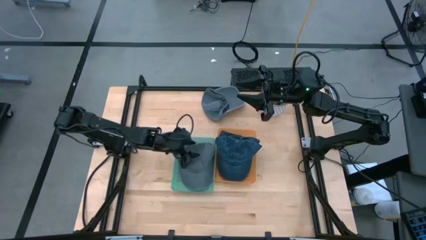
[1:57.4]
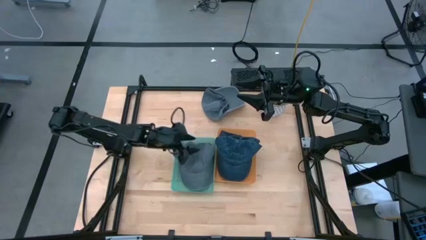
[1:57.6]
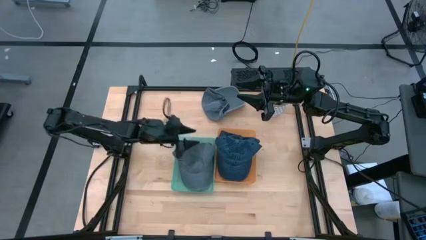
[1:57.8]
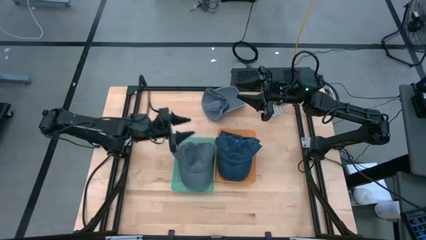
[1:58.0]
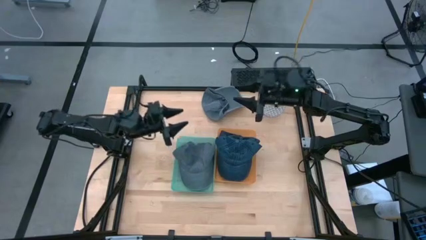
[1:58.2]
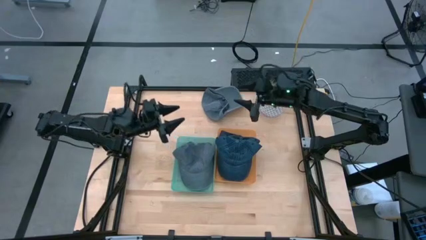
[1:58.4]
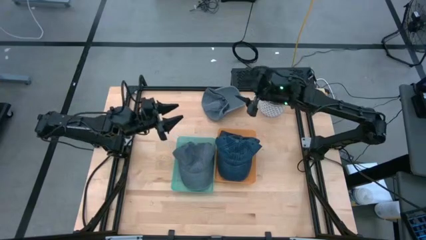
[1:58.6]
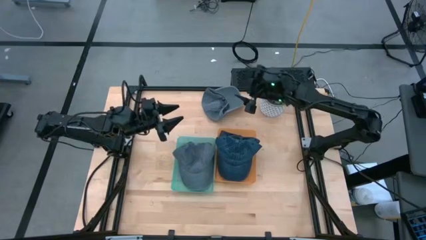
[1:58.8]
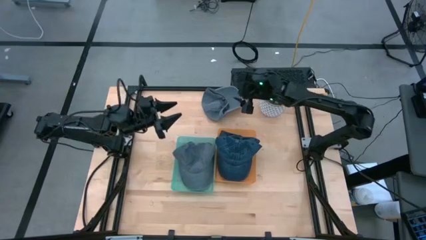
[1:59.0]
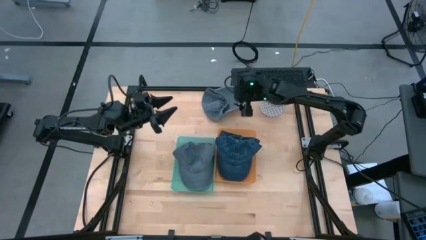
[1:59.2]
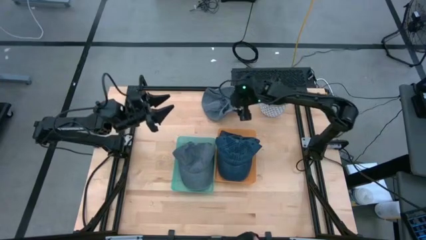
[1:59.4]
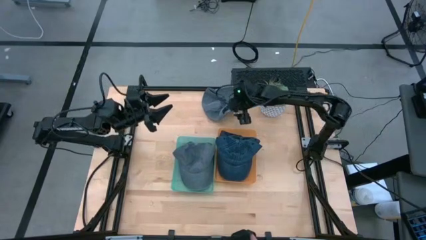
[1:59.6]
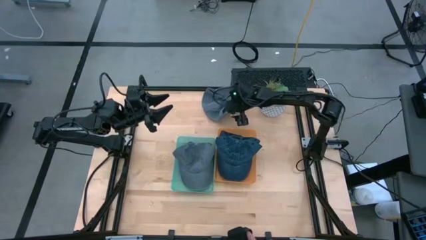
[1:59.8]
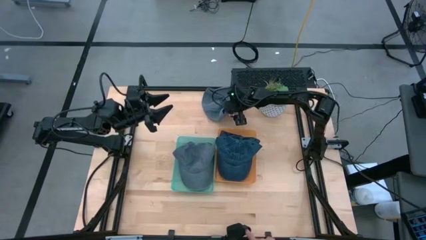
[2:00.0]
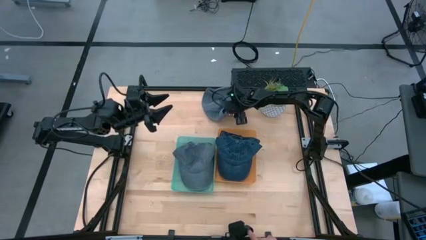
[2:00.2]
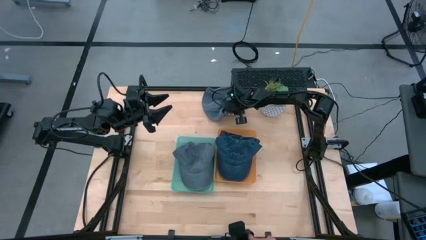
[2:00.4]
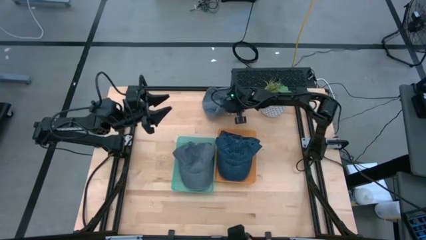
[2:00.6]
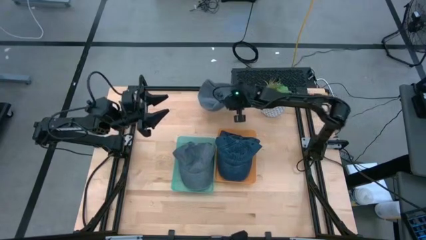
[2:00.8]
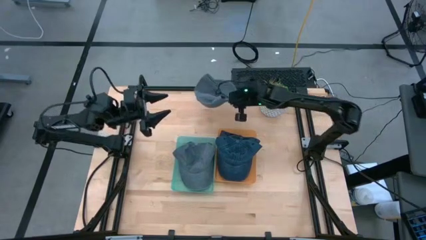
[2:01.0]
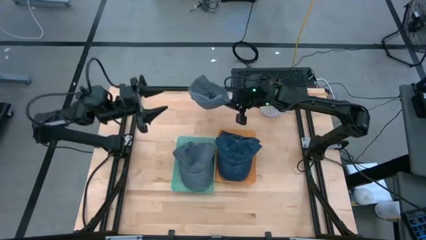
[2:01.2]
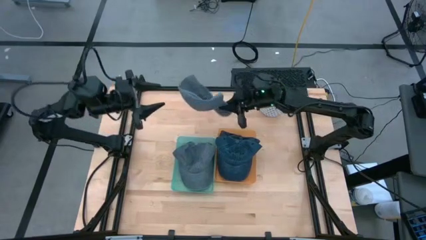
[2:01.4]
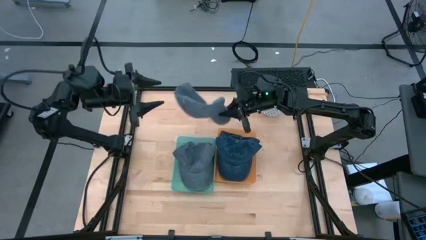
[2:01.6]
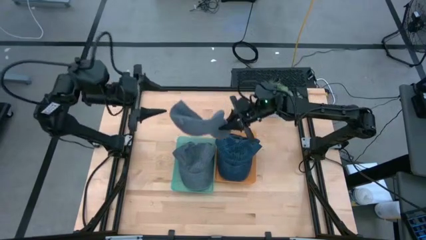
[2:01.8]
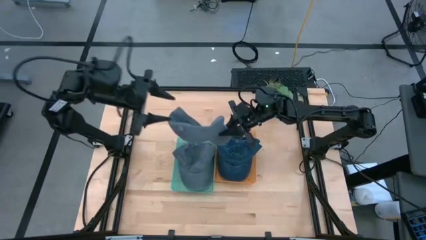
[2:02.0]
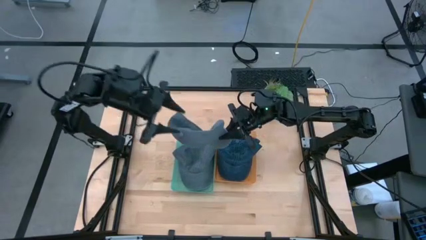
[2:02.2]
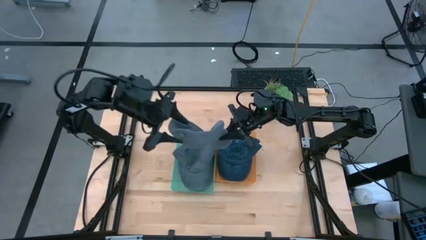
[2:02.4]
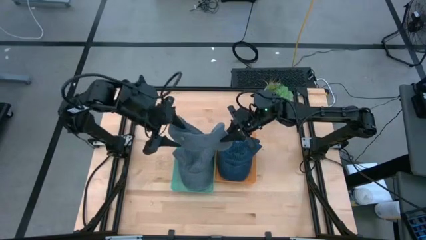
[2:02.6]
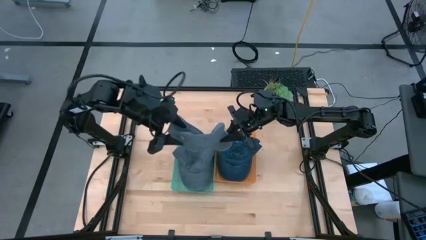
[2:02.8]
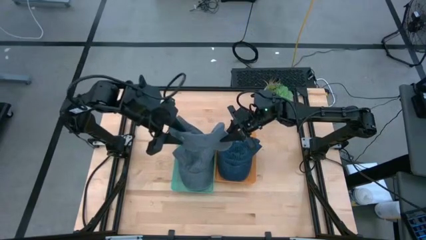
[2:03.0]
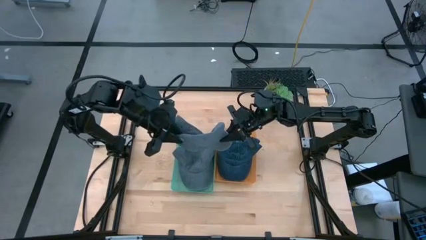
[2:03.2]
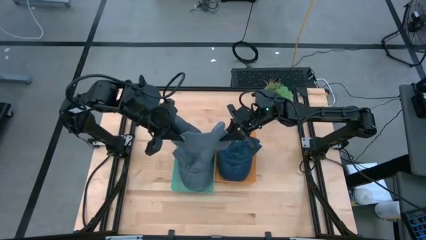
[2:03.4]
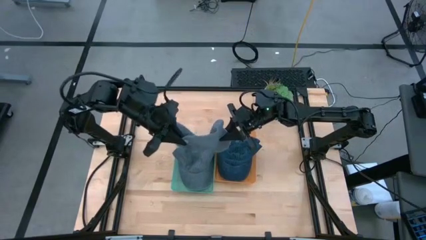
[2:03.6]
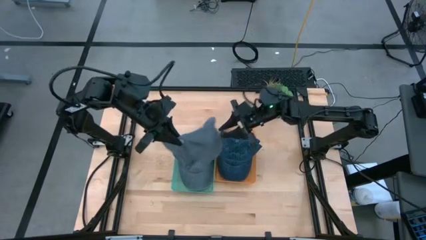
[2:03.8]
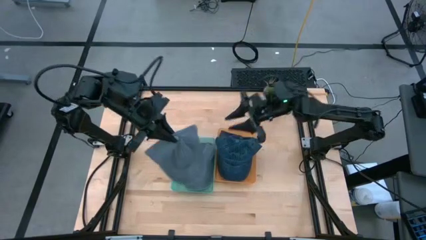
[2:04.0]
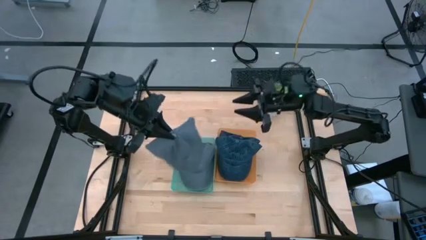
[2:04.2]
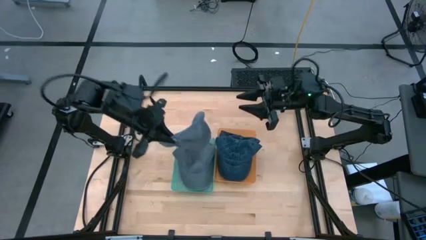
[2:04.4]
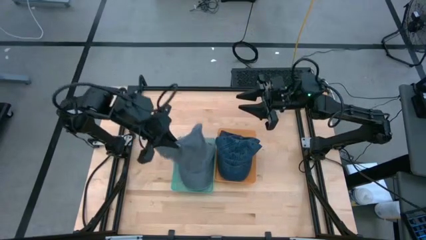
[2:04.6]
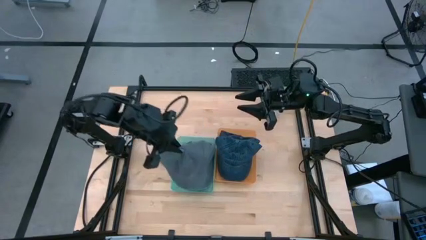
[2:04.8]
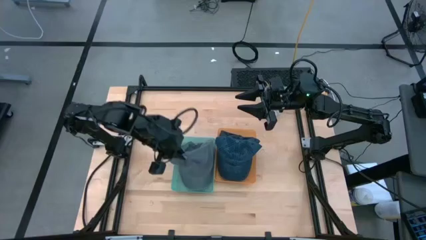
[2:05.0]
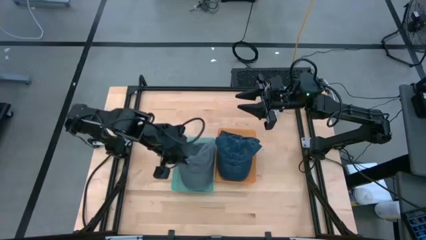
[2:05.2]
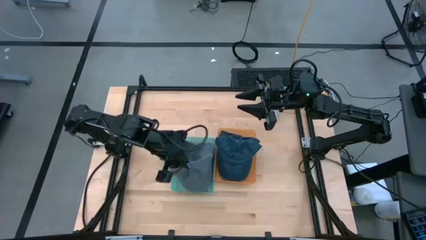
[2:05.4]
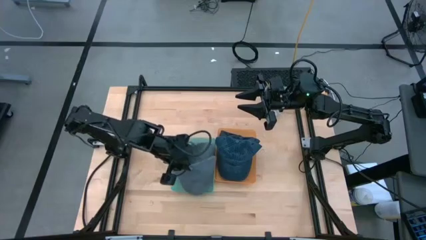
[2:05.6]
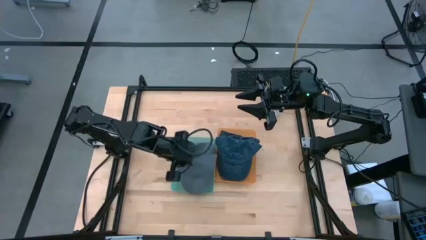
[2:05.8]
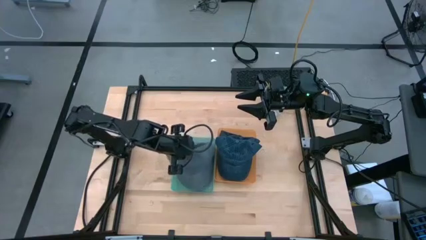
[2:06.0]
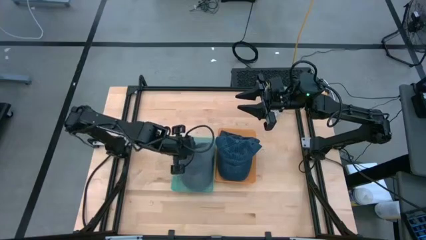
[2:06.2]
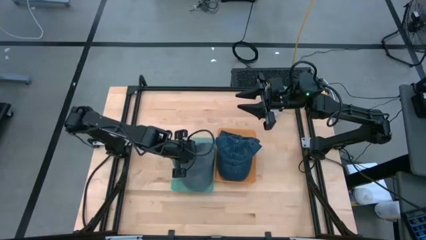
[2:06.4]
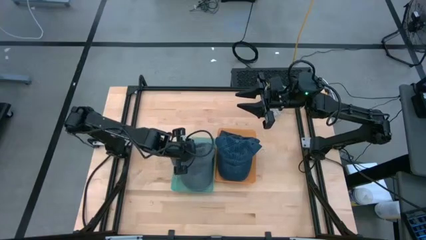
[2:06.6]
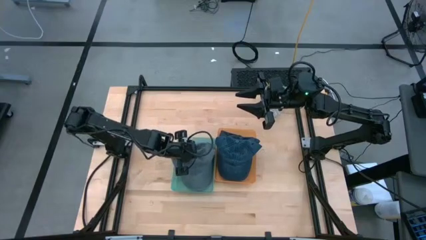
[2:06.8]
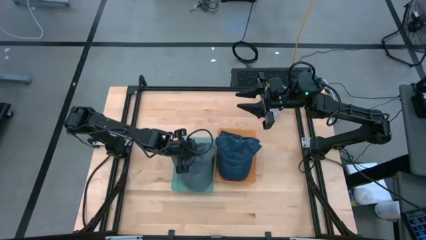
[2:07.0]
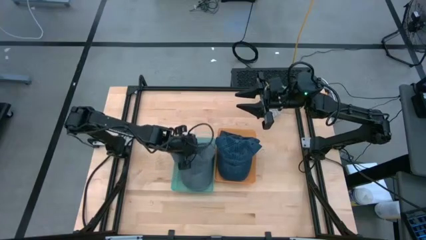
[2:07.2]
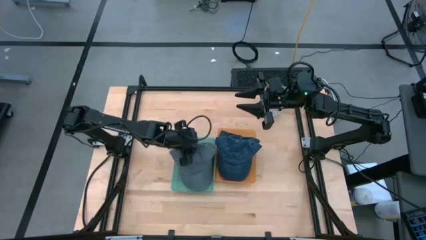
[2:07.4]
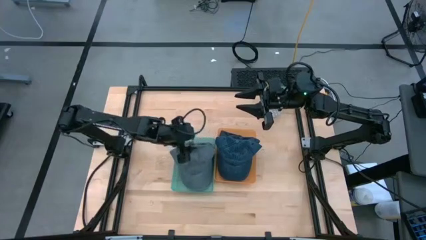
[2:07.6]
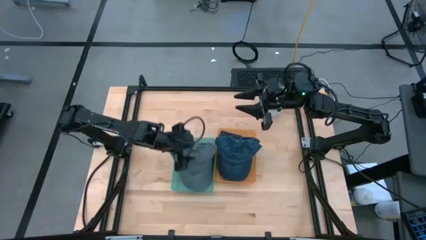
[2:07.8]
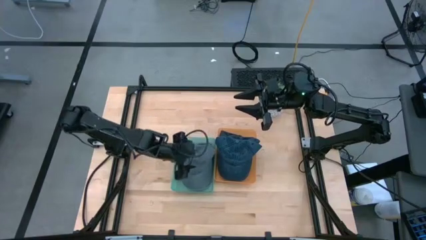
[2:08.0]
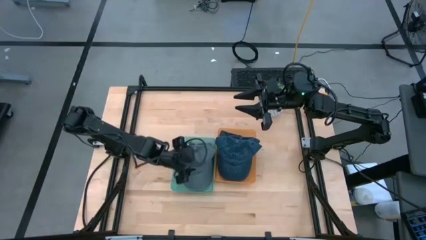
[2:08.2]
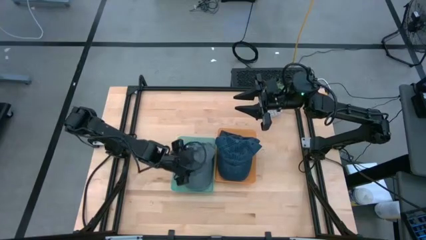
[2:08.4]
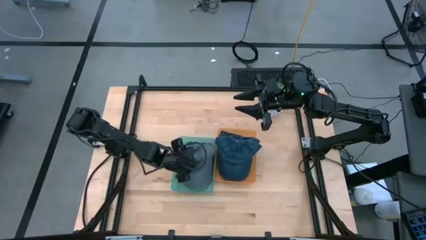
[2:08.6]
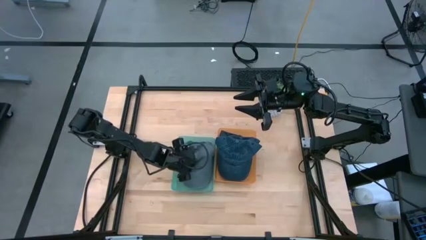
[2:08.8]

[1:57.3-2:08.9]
Task: Pick & Place hat
Put the gray cap into the blue bin

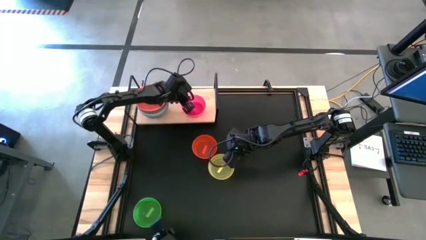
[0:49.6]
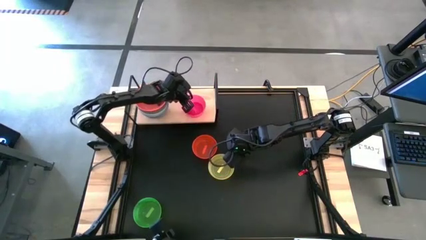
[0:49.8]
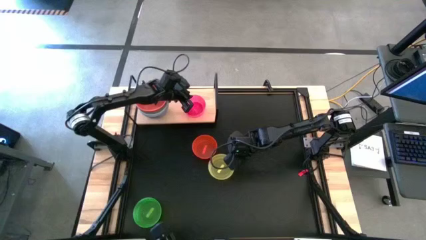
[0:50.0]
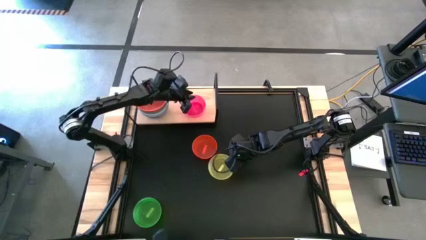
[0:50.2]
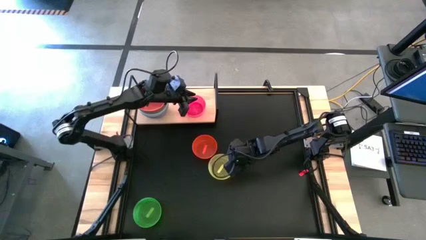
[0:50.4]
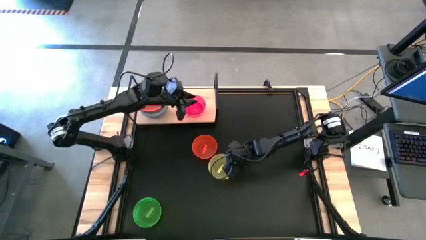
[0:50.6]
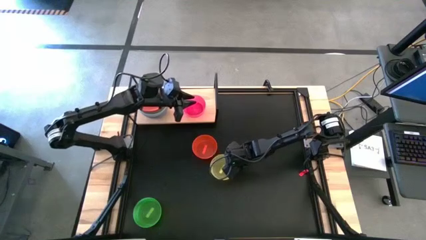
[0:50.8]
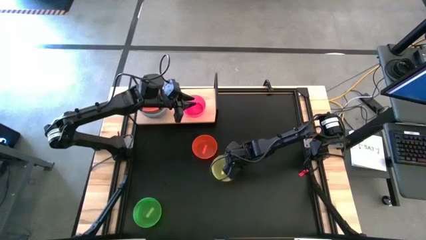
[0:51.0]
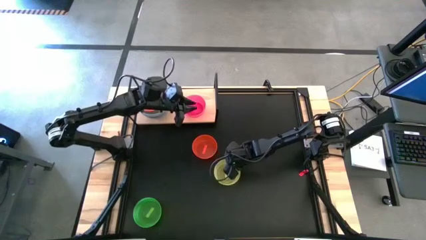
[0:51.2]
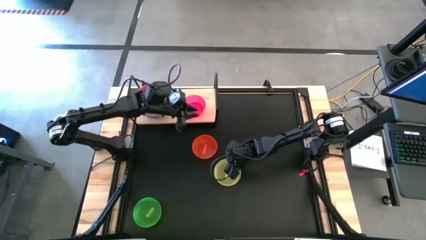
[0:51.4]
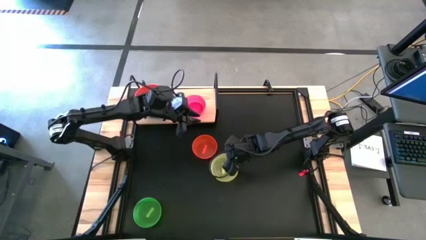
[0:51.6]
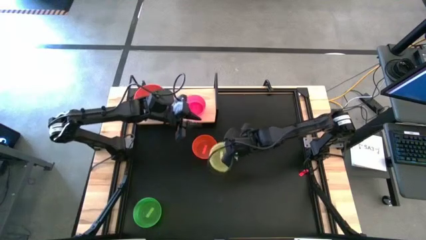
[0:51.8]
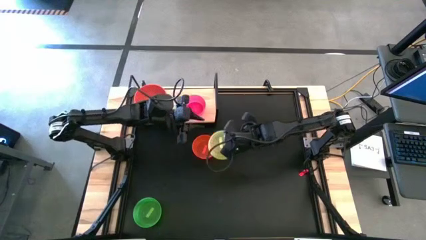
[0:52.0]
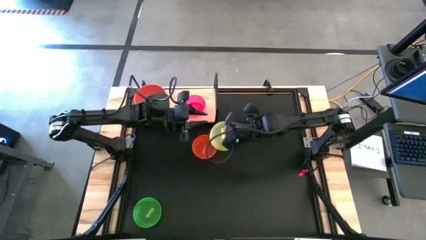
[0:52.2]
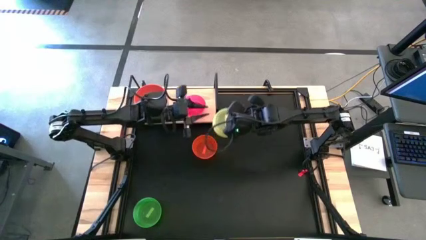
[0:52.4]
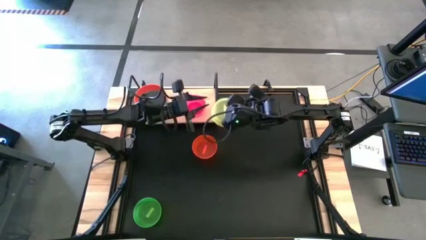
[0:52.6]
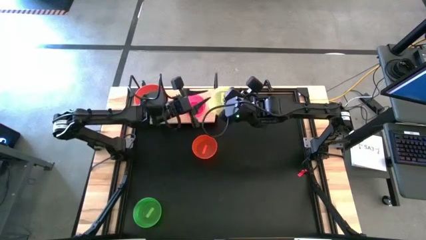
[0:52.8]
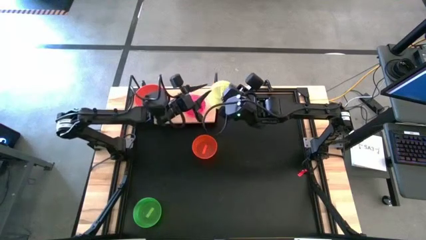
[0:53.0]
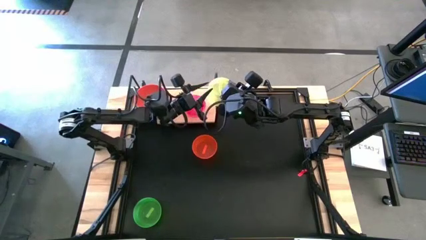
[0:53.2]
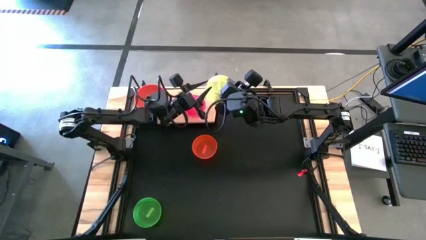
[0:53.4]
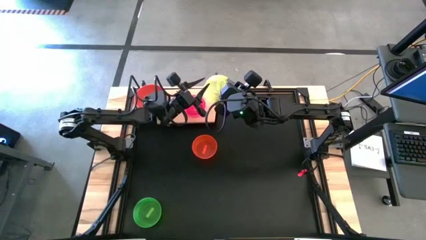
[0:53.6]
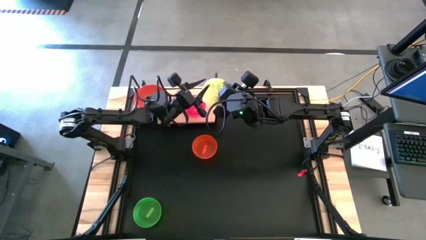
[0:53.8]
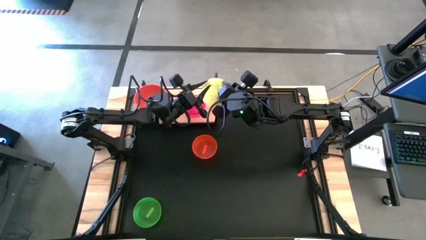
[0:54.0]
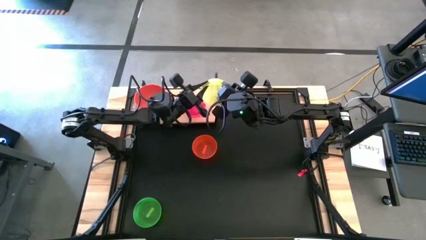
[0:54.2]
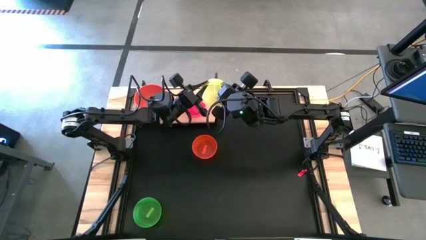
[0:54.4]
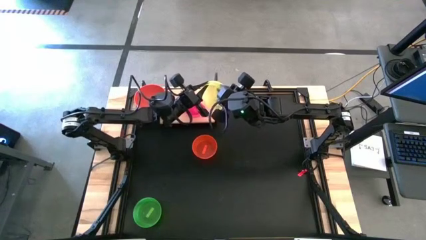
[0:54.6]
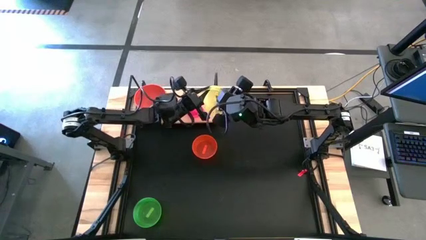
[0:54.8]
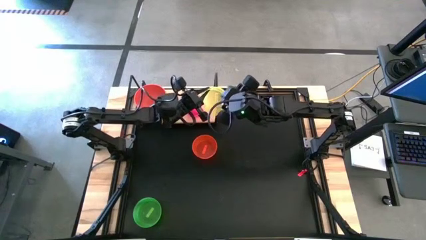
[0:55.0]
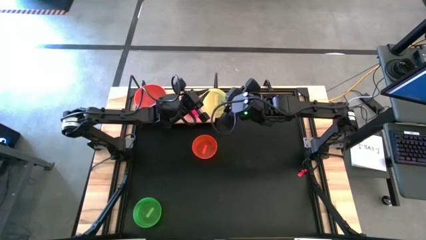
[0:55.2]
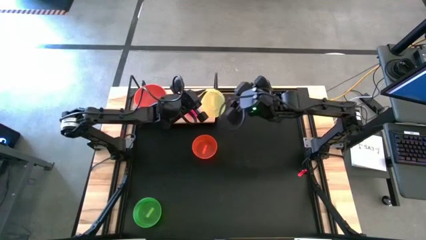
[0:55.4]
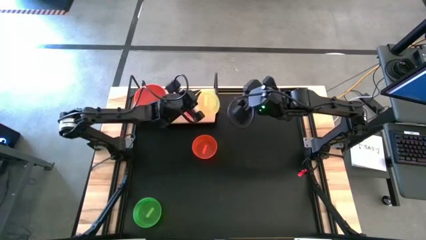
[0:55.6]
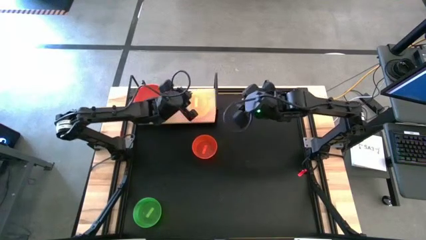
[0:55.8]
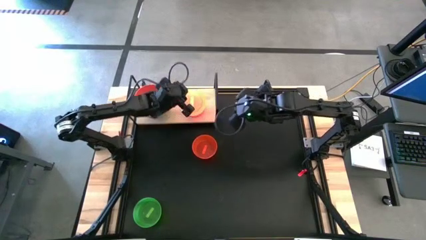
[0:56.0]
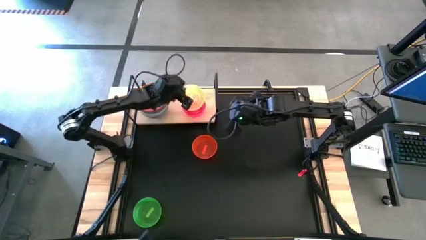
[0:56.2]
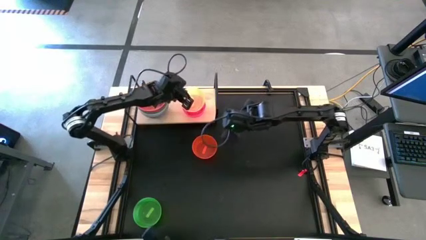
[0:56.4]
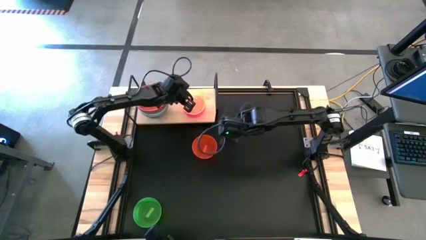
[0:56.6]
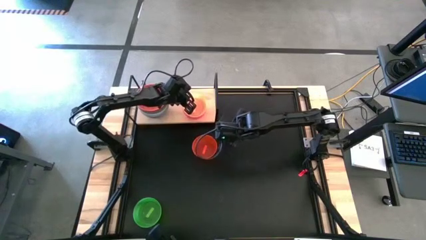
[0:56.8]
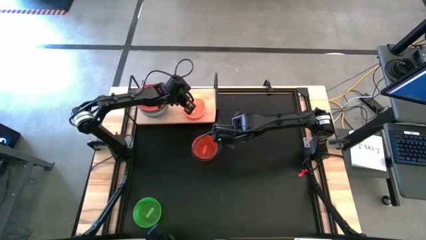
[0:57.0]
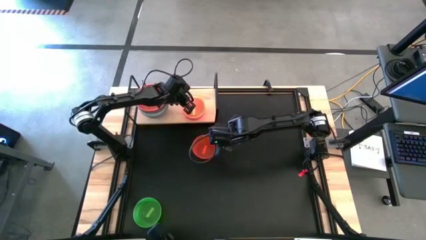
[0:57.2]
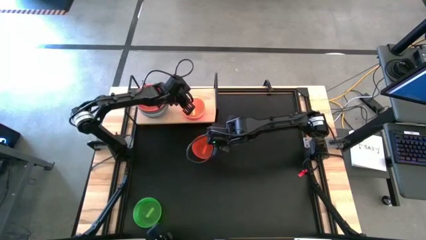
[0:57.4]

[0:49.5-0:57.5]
Task: Place and stack bowls onto a shelf
Stack the yellow bowl on top of the pink bowl on the shelf
